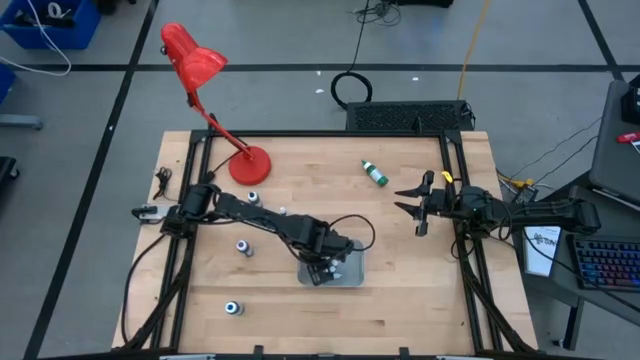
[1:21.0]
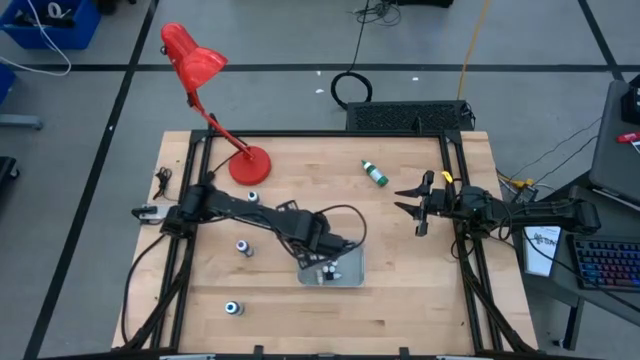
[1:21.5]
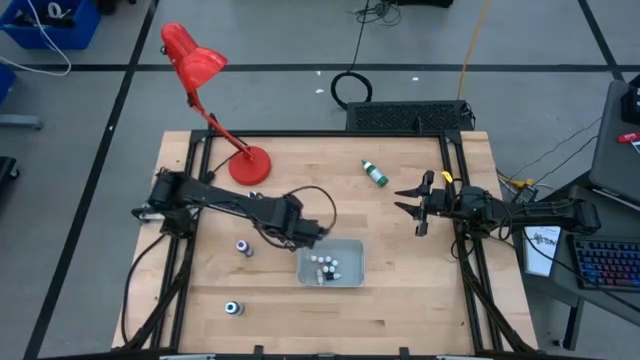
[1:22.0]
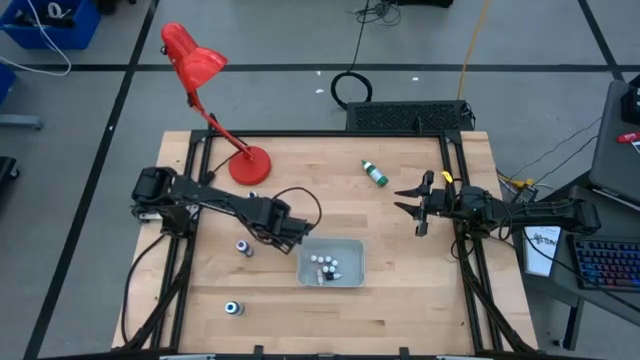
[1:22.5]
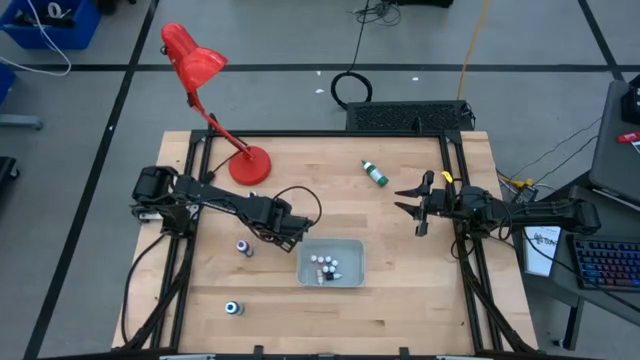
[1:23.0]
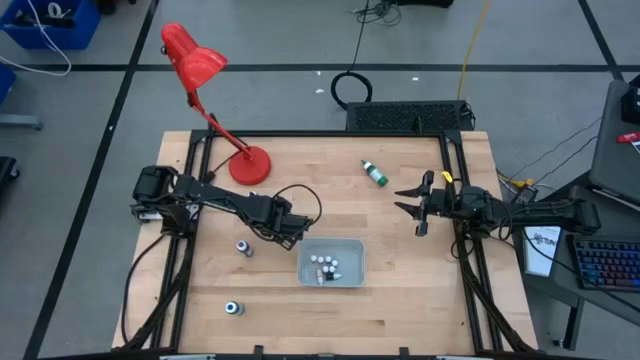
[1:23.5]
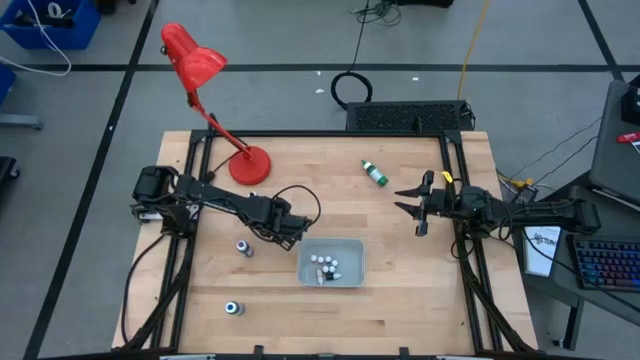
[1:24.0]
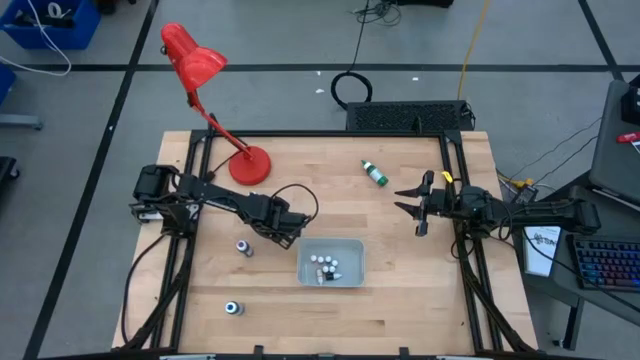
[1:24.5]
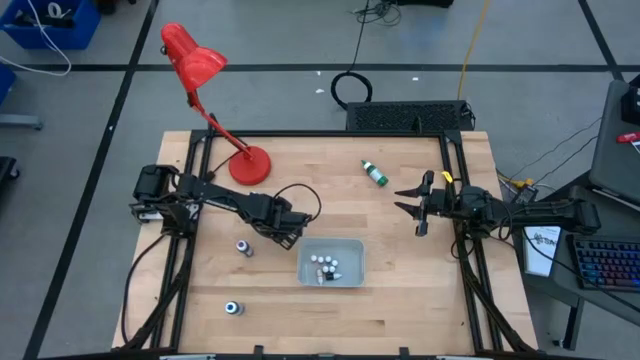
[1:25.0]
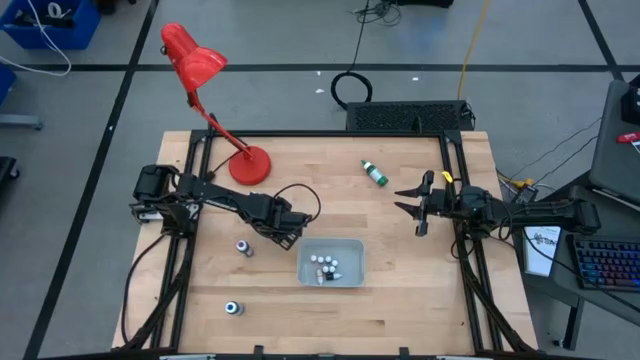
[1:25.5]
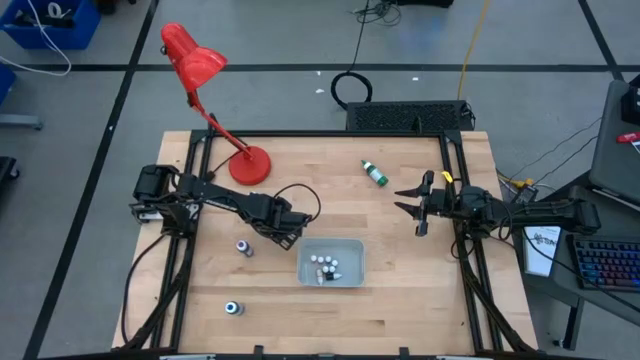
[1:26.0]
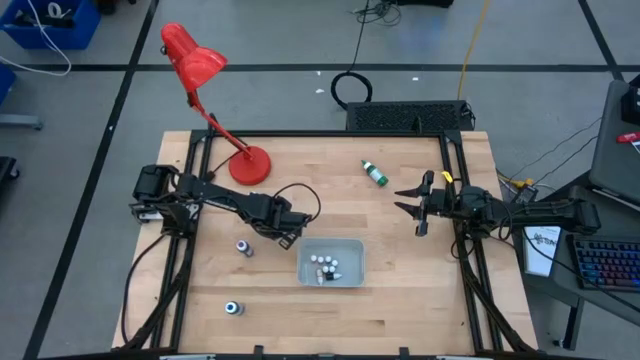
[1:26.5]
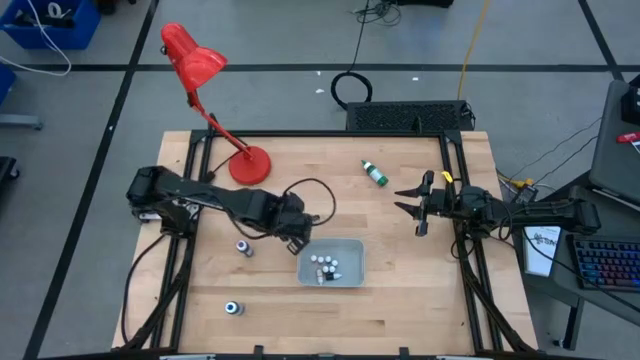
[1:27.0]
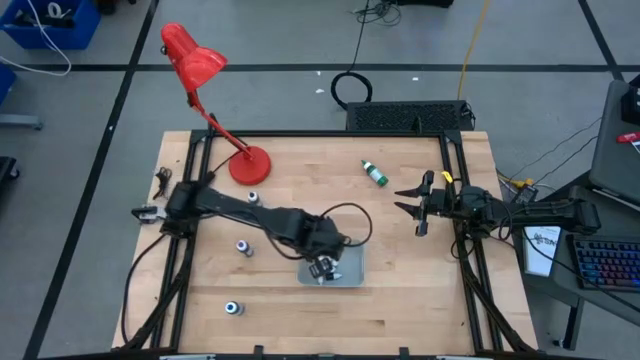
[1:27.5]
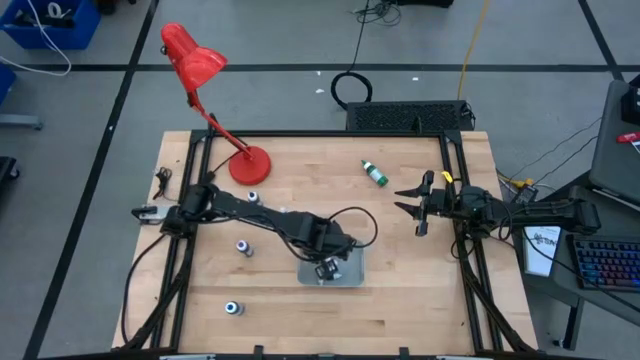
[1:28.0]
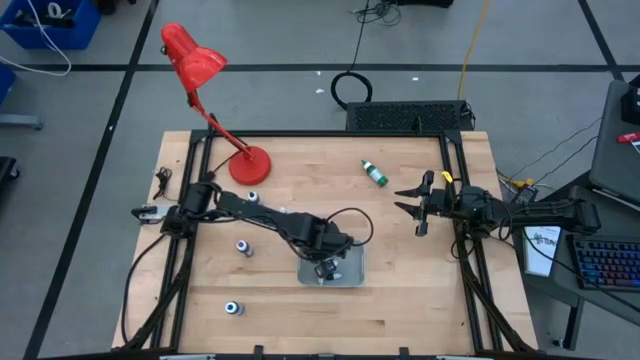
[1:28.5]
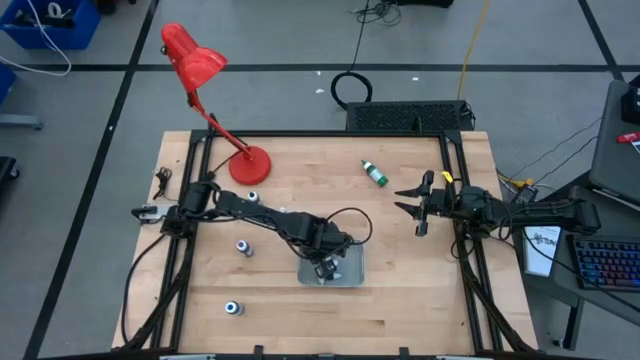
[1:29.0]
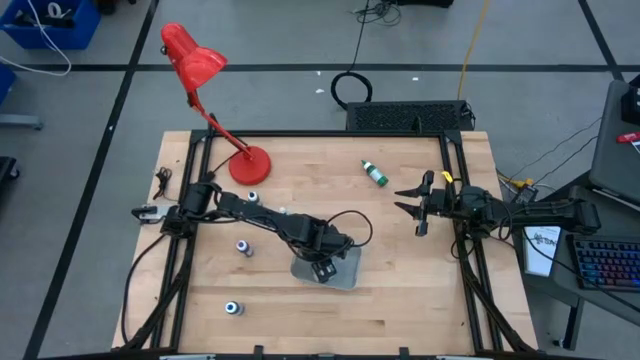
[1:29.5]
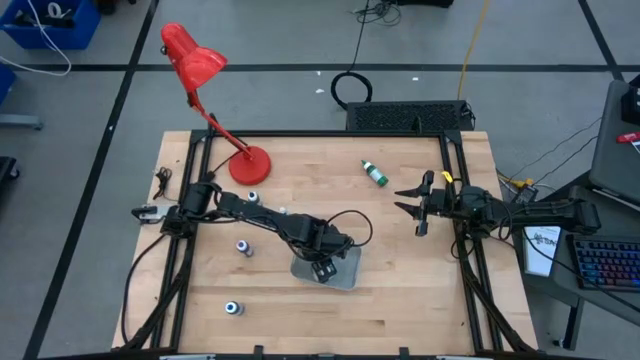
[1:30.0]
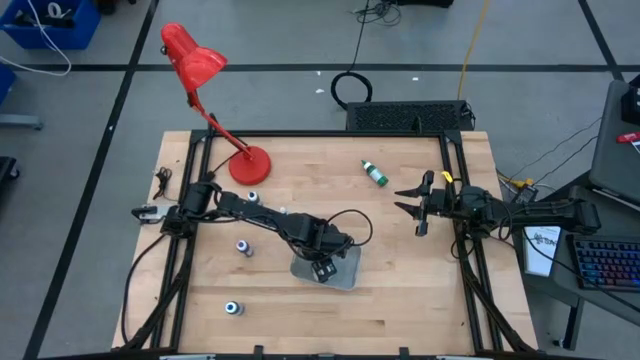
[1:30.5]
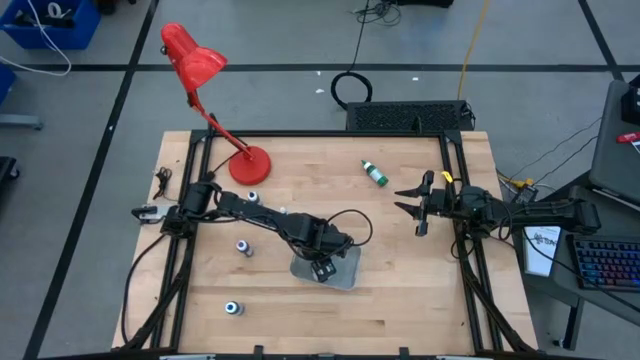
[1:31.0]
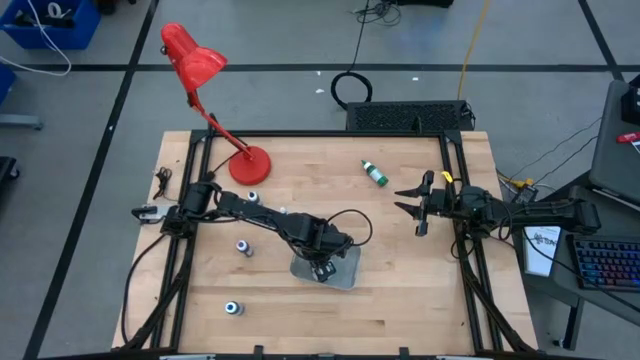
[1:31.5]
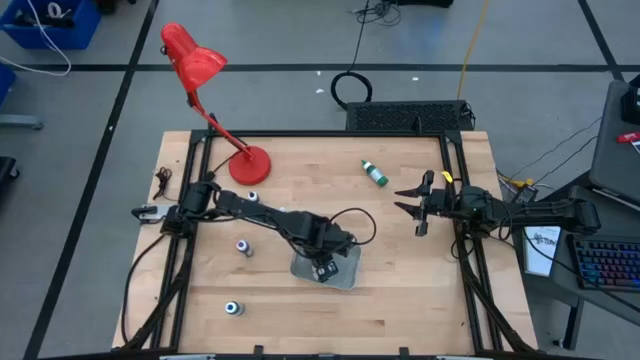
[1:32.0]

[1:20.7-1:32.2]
Task: Pick & Place food coloring
Put the small orange food coloring bottle into the gray bin

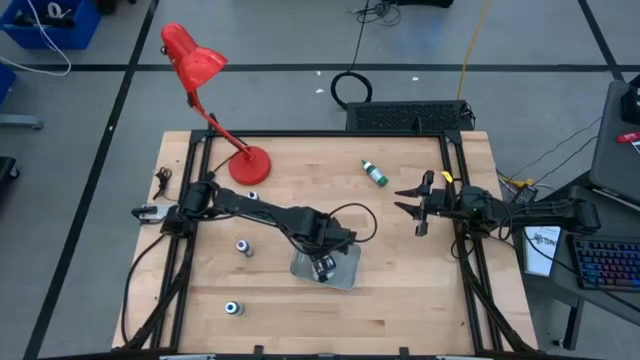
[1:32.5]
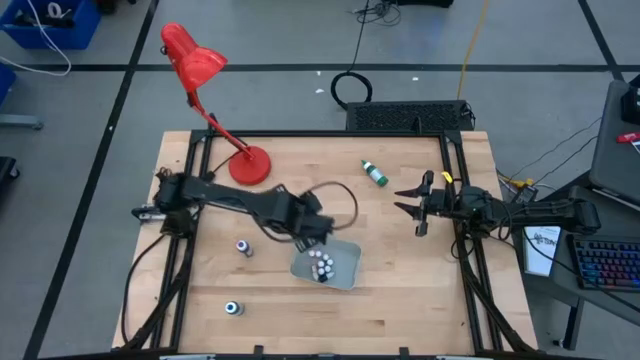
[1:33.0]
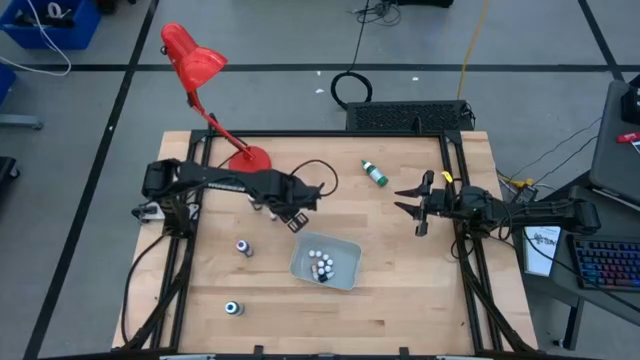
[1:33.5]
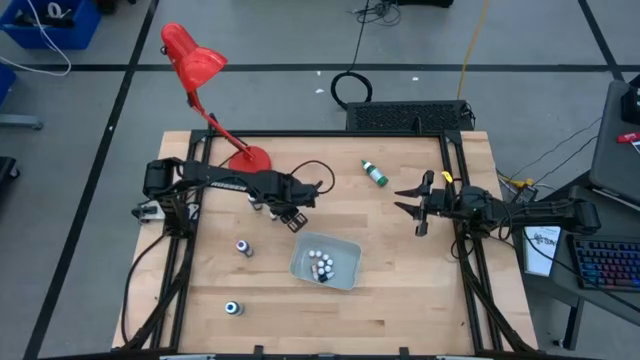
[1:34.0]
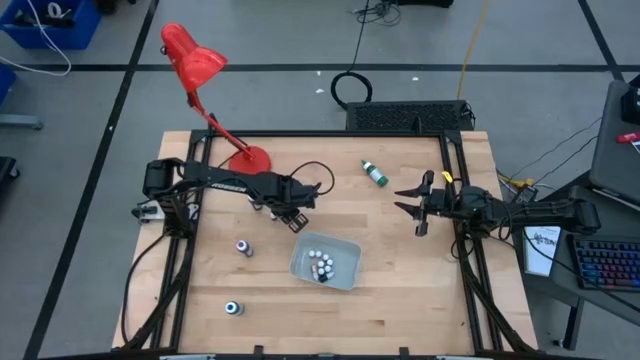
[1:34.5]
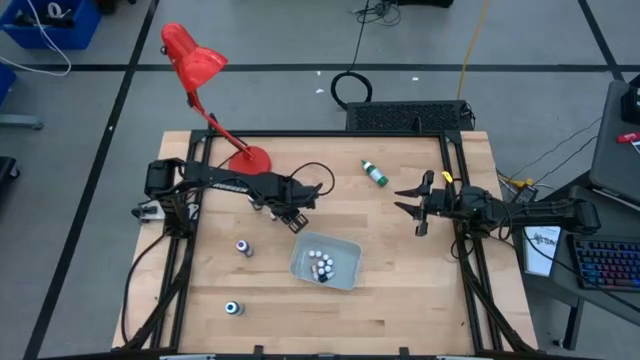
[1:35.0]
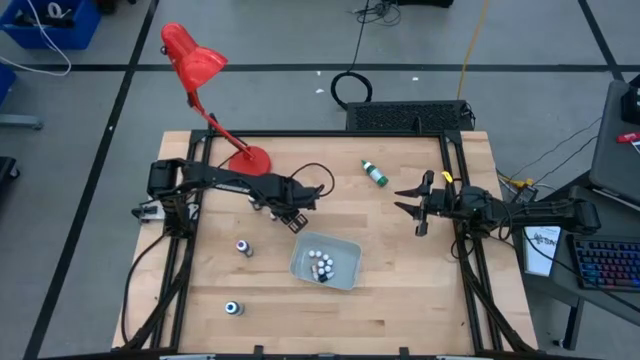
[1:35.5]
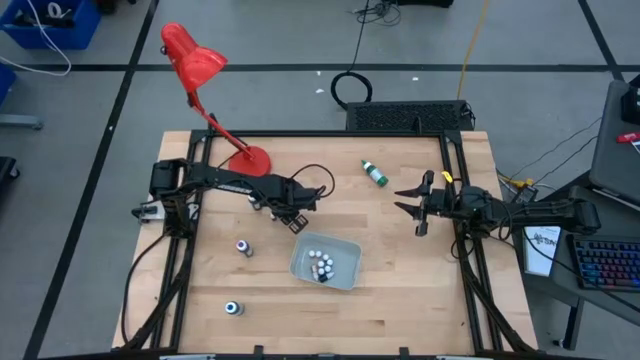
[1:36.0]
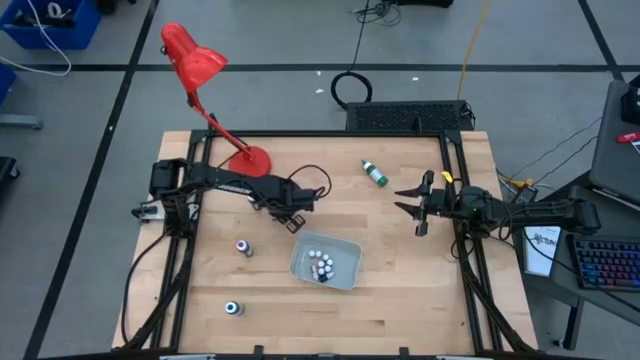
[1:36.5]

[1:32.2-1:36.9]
Put the small purple food coloring bottle into the gray bin

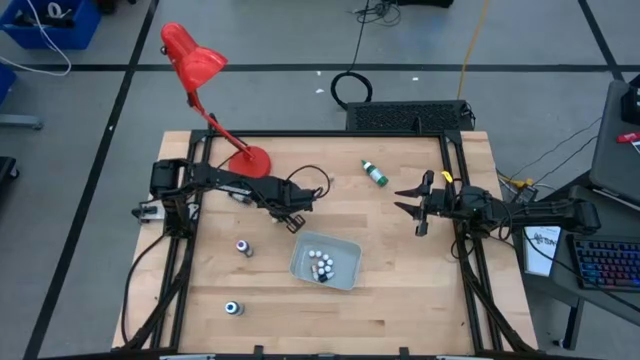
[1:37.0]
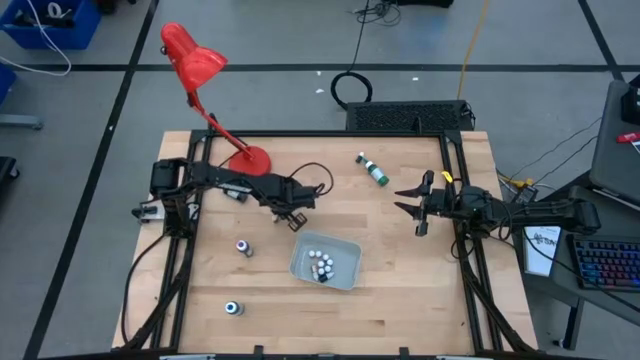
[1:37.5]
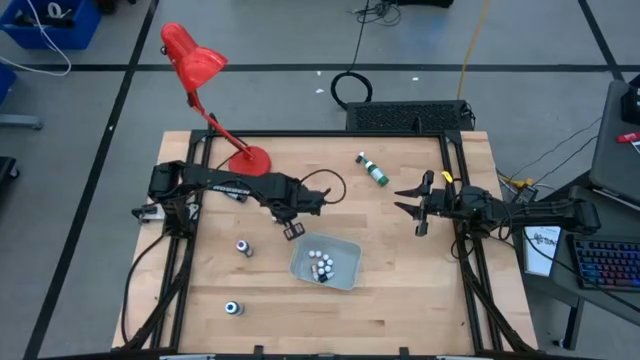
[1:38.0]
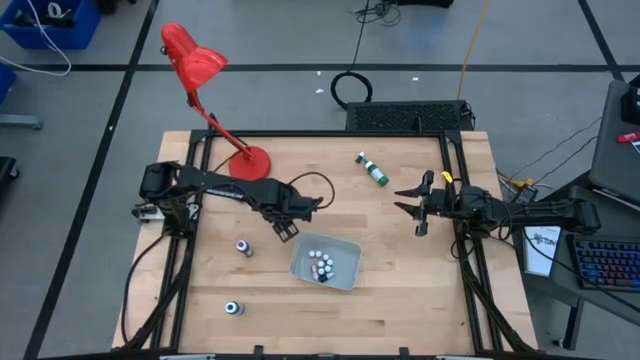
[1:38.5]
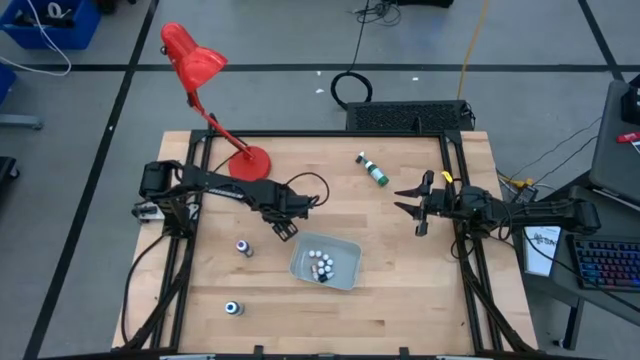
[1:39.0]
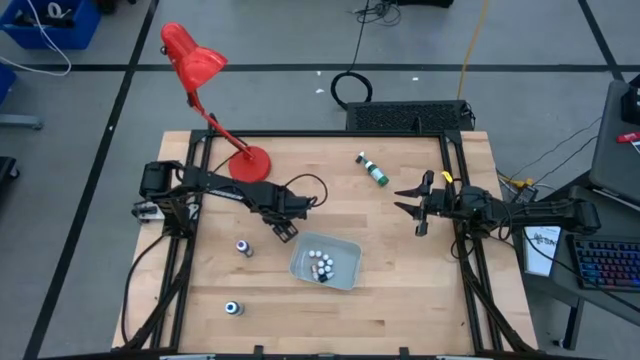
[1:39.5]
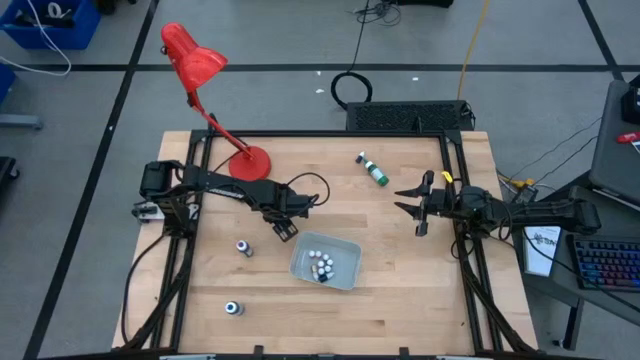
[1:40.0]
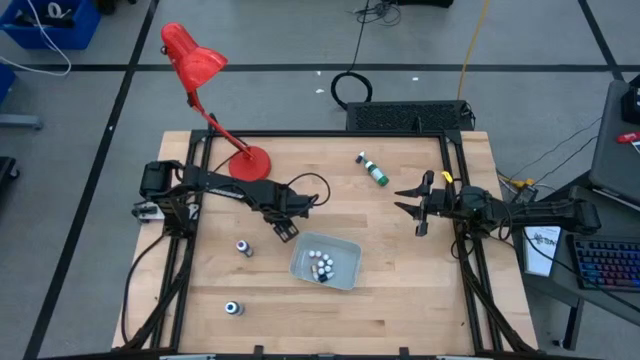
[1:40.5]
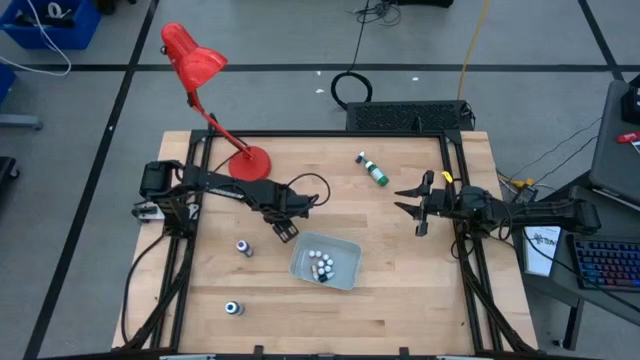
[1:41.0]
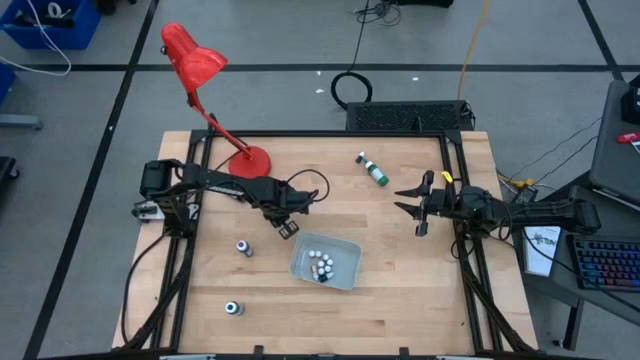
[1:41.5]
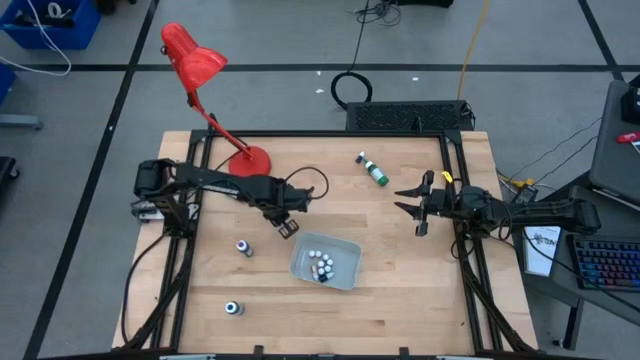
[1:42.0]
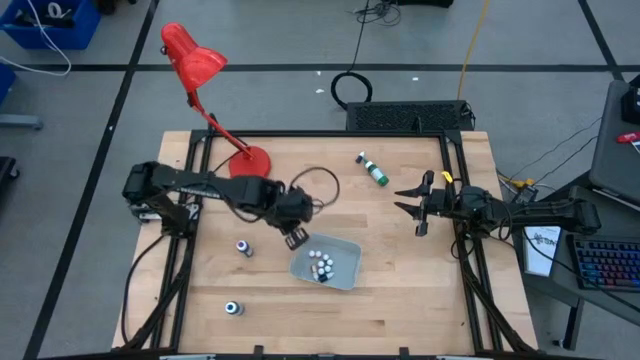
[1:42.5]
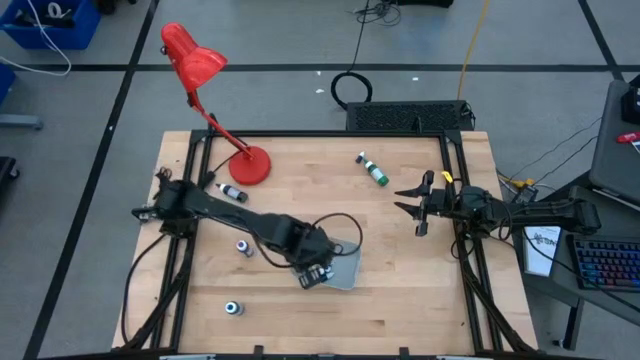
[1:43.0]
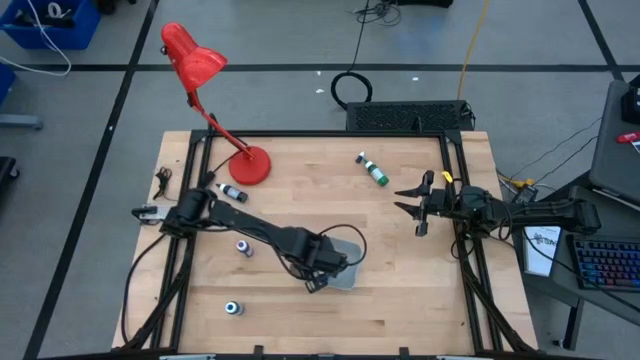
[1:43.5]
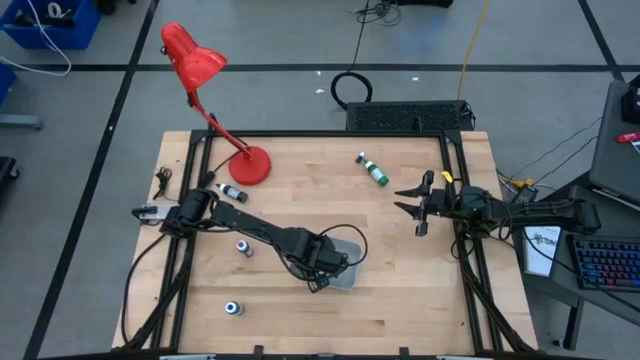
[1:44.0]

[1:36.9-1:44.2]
Put the small red food coloring bottle into the gray bin
